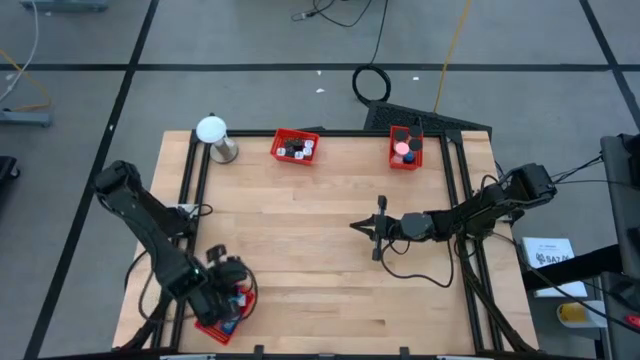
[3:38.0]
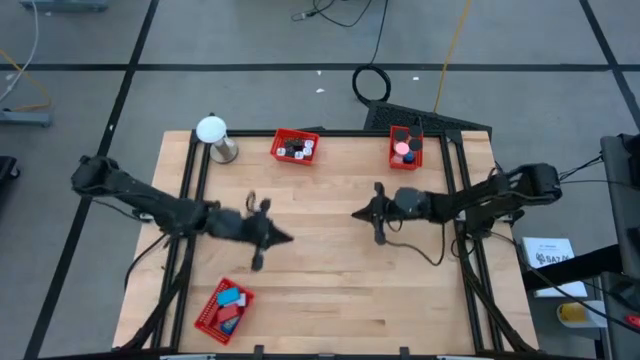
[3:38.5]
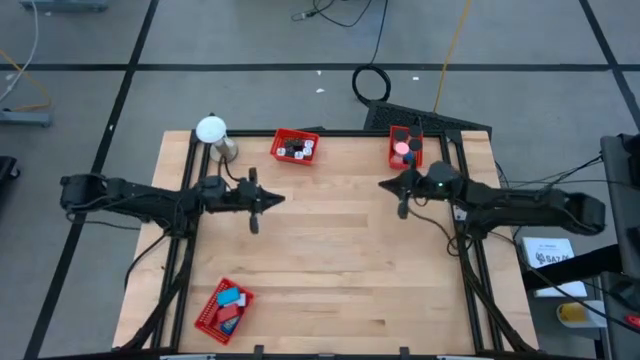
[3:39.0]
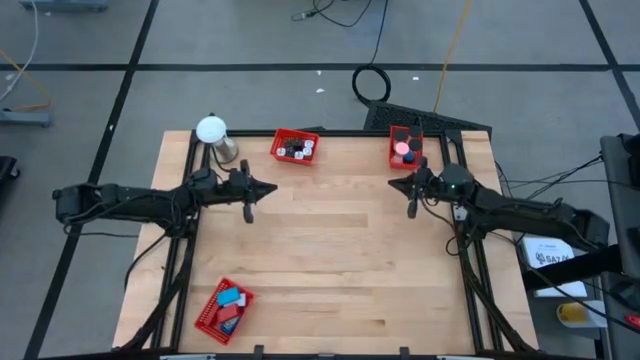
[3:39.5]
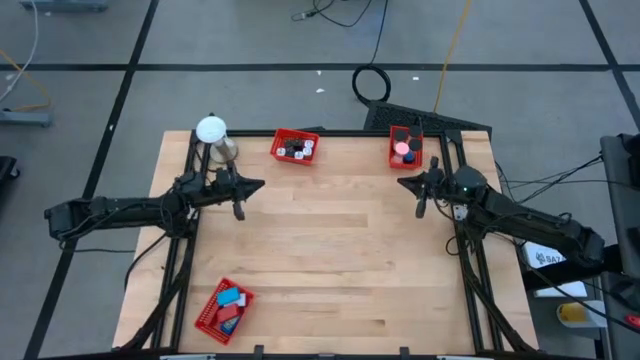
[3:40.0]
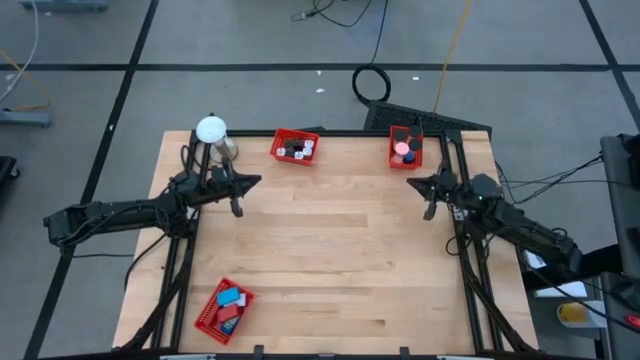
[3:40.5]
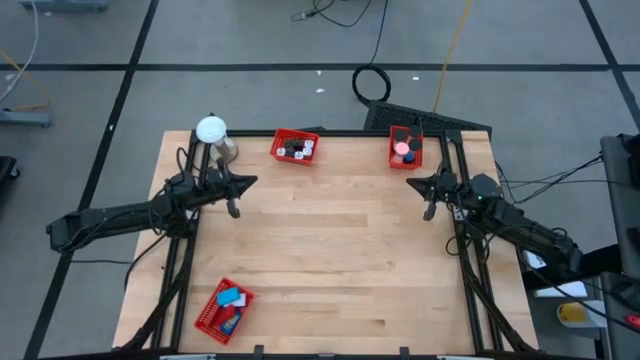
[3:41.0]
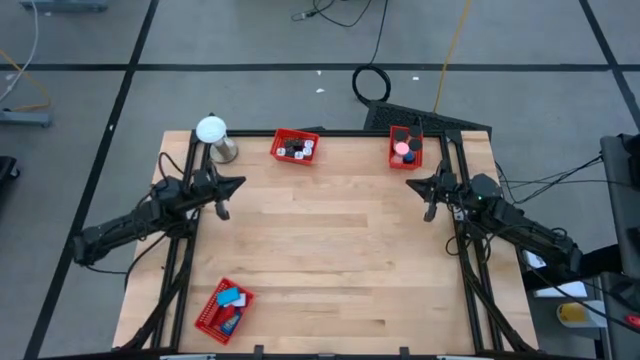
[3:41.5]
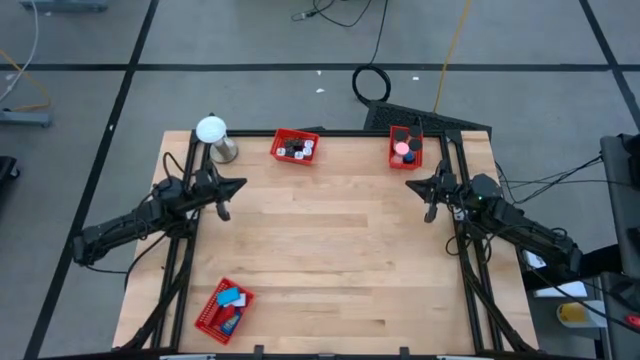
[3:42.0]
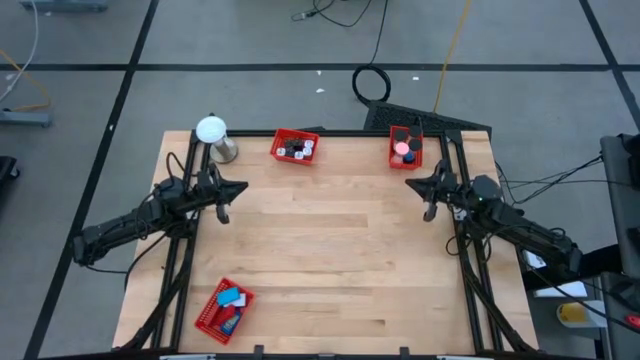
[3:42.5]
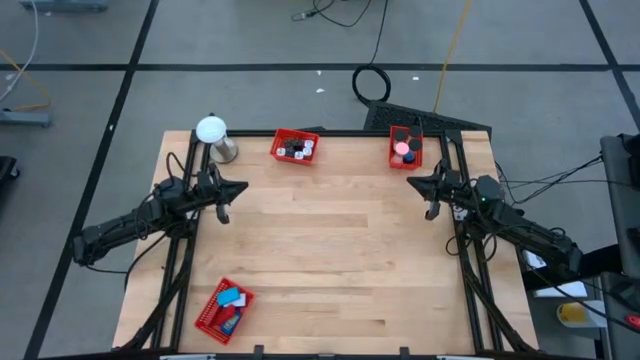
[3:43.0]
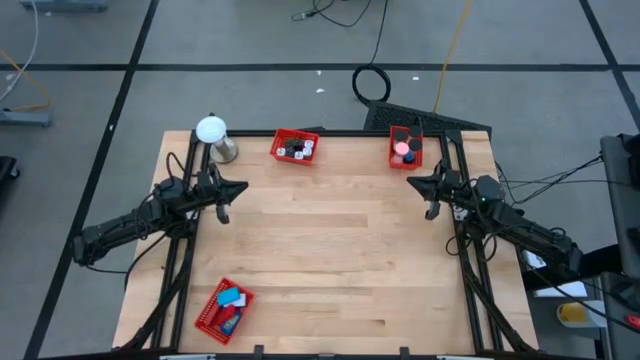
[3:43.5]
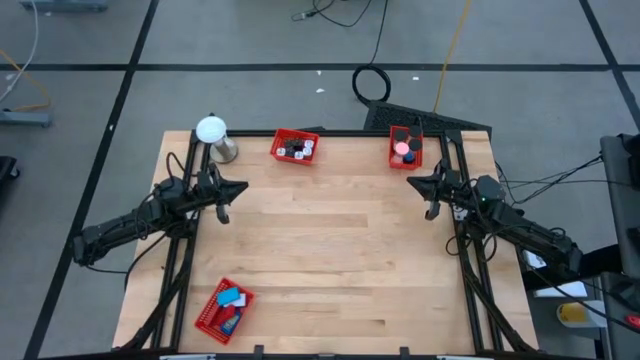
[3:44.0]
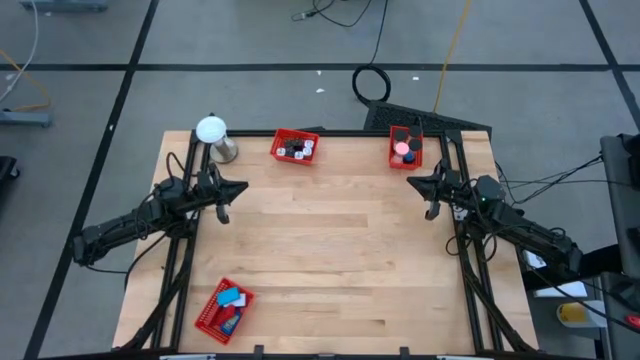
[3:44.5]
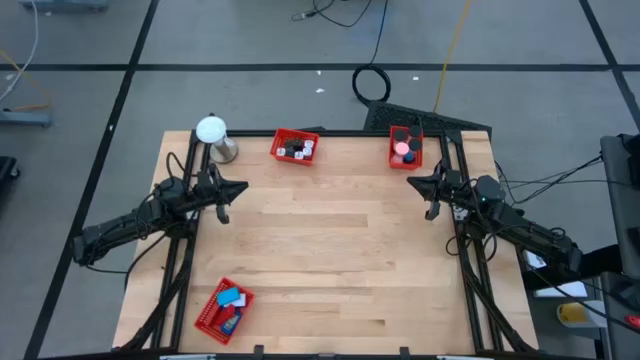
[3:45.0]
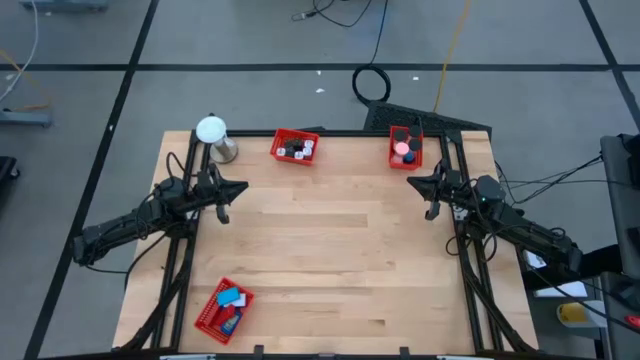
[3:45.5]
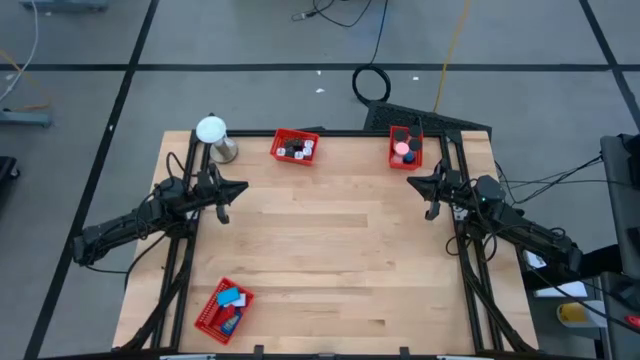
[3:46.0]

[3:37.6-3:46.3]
Task: Pick & Place Office items
Return to Home Position

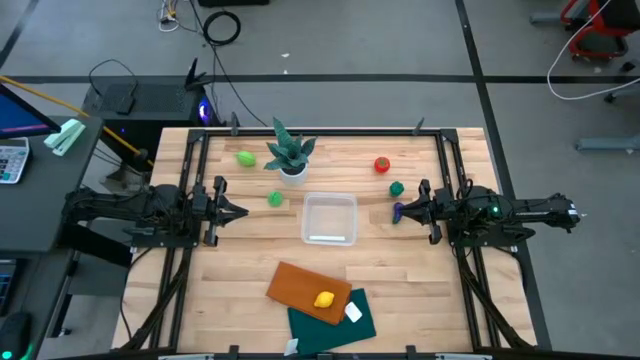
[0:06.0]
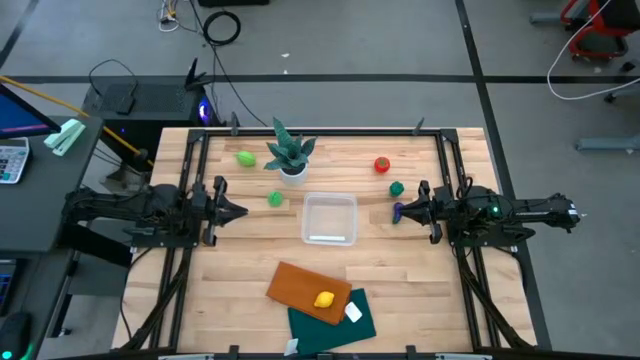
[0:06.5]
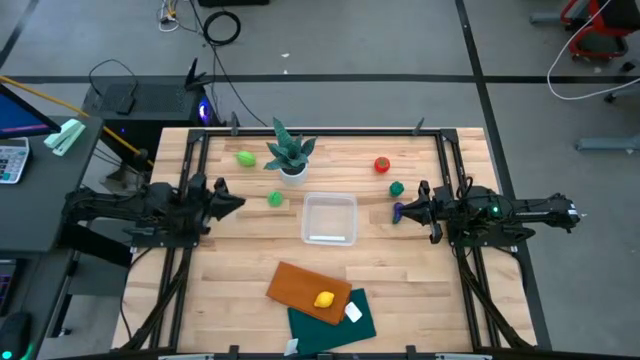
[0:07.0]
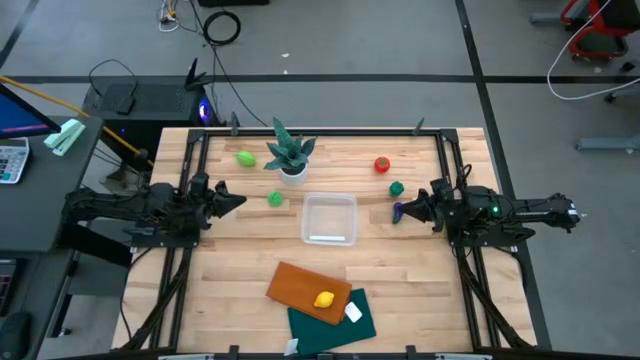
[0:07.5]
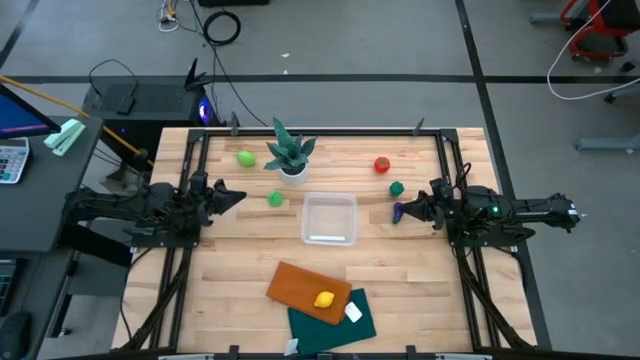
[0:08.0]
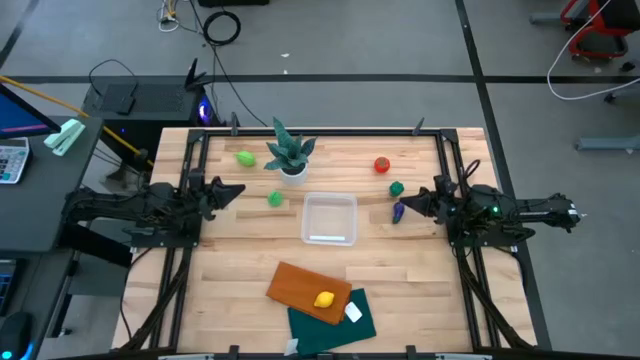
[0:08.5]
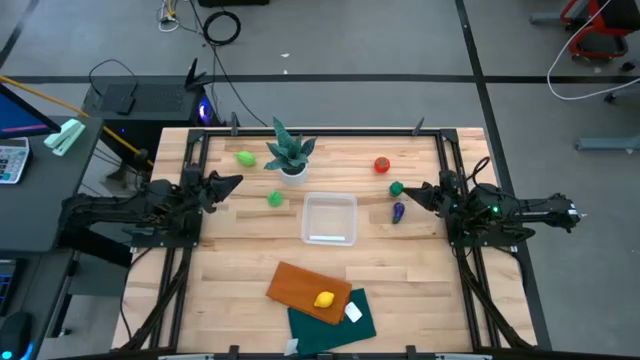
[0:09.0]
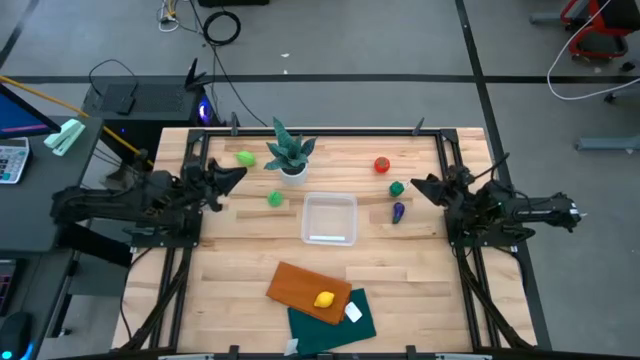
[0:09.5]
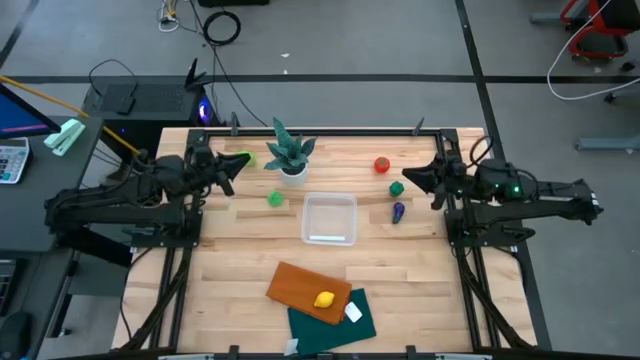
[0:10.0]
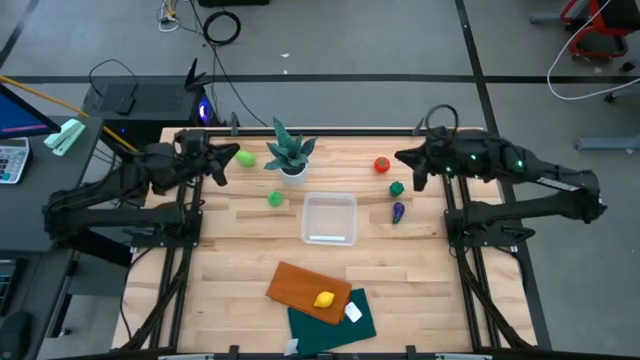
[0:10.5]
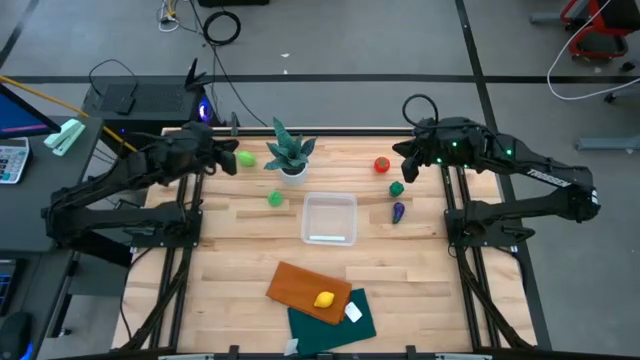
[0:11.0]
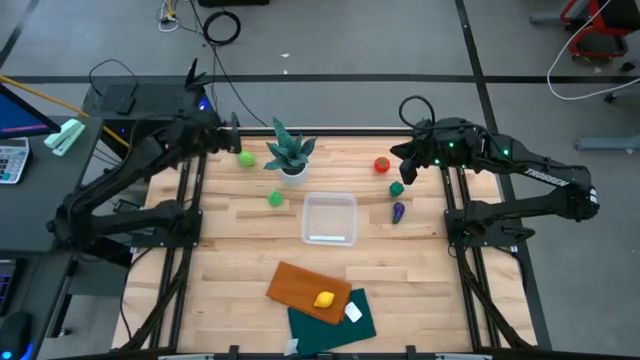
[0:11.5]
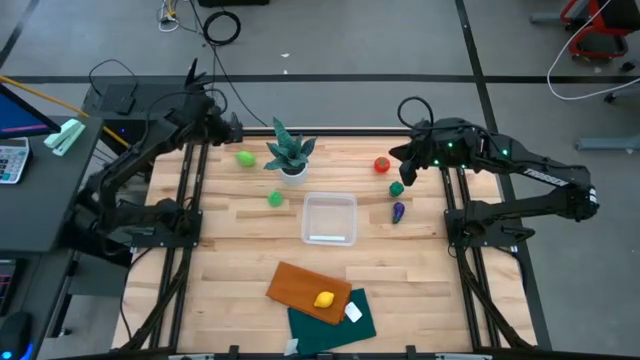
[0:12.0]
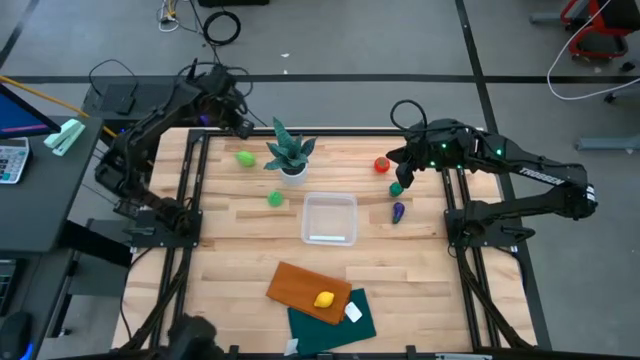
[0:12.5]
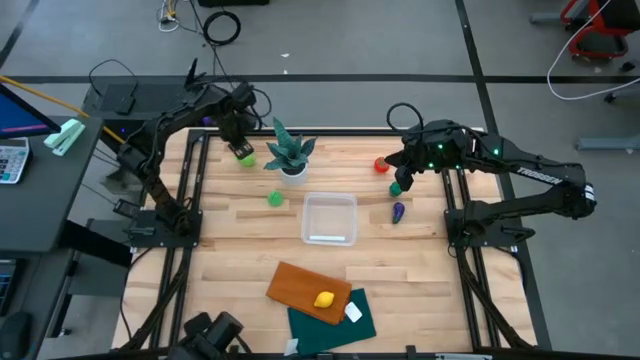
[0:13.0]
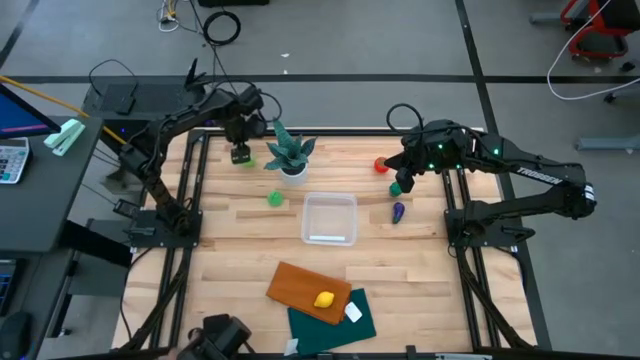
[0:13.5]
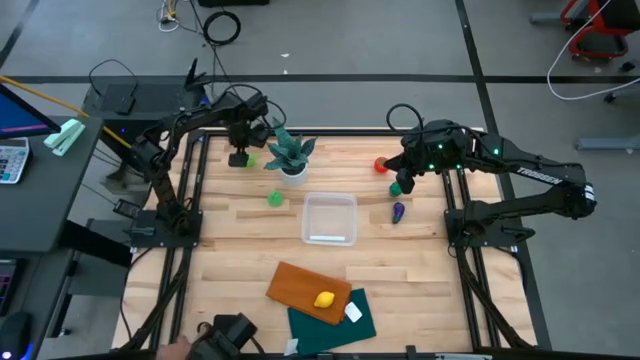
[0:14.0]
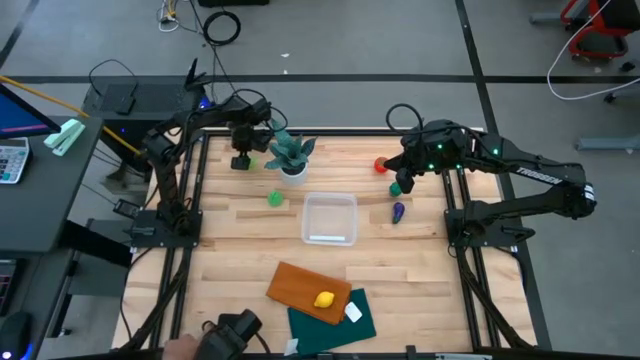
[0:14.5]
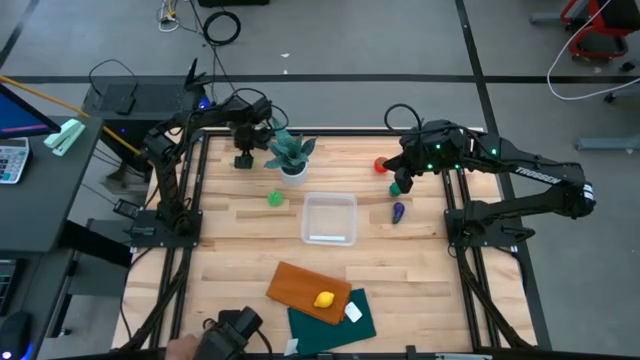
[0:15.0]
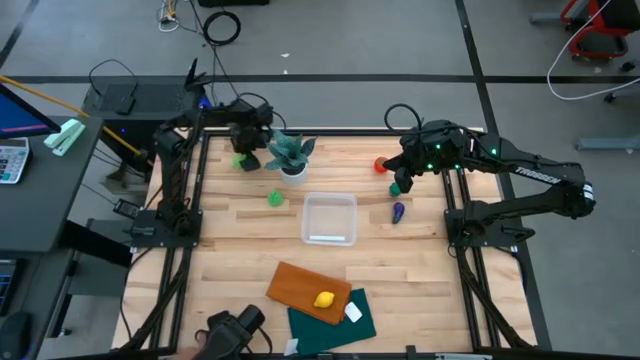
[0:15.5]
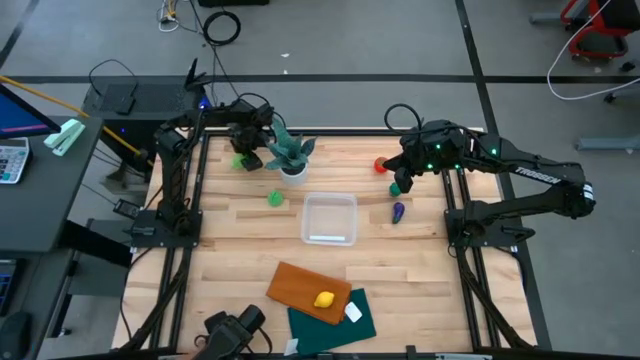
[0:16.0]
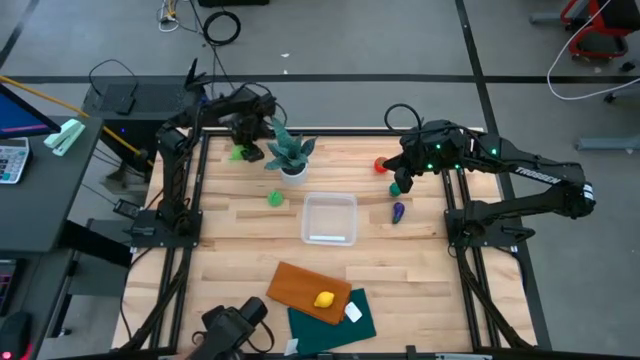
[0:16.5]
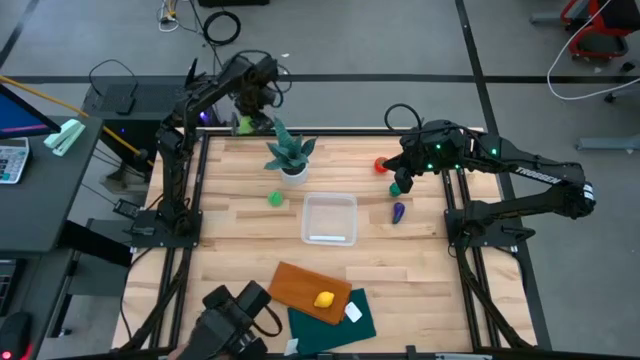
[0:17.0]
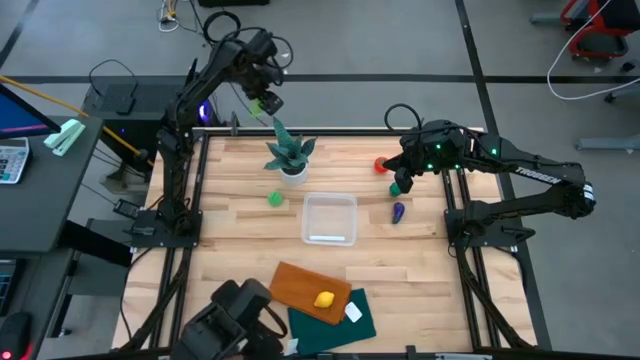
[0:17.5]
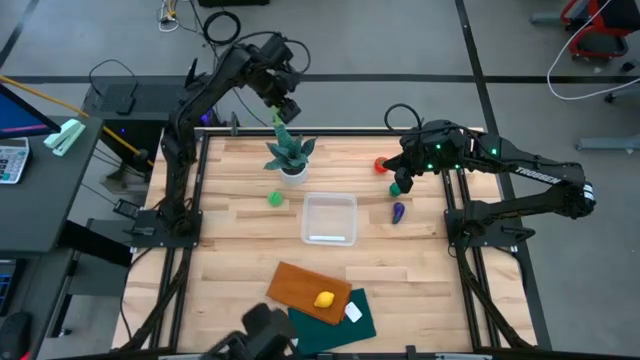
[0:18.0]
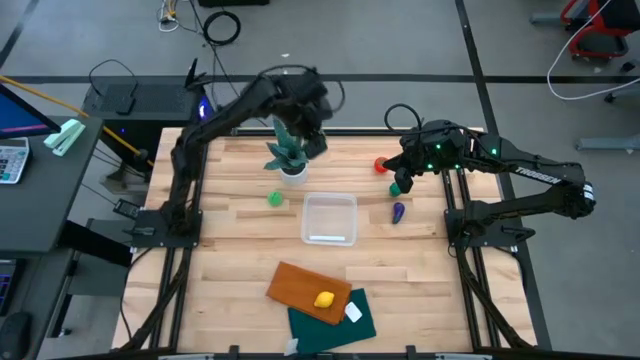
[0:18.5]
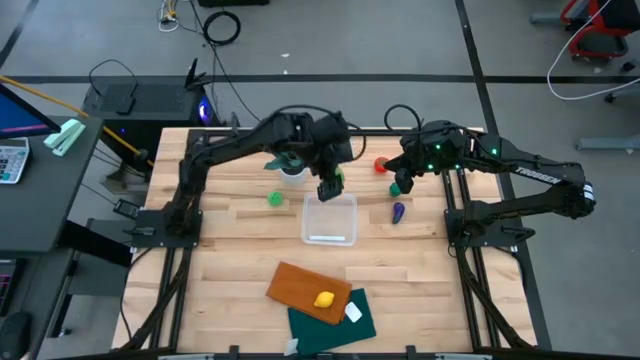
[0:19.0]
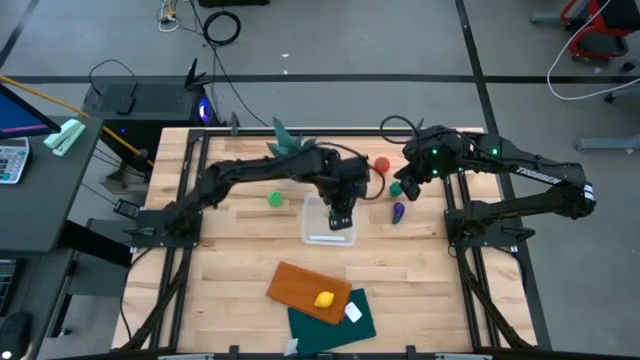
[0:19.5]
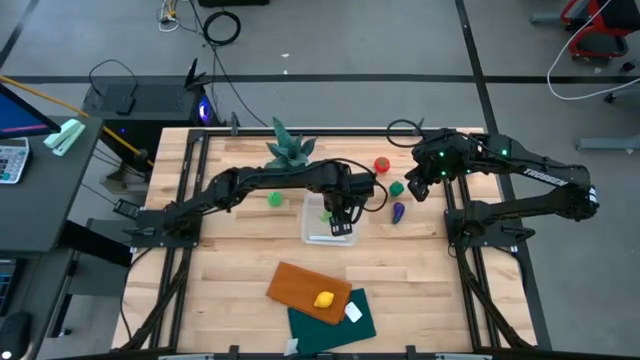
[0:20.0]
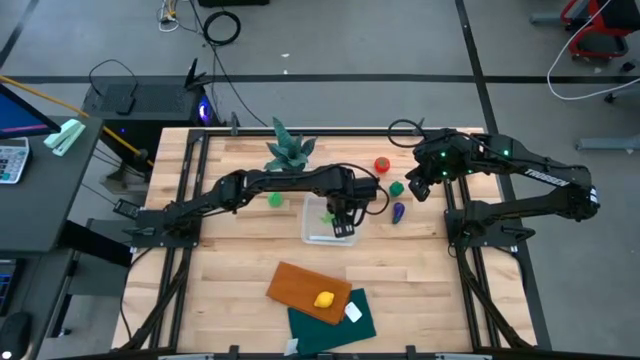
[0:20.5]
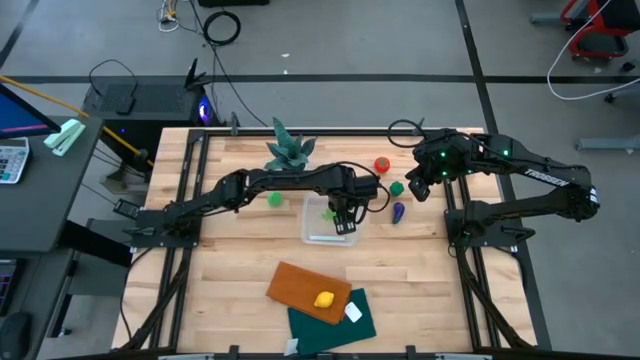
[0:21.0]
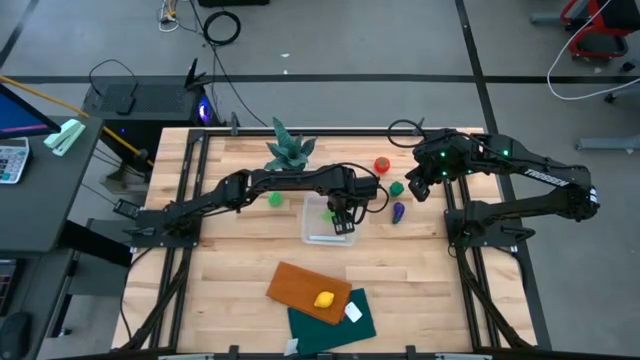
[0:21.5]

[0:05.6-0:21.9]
Task: Pick and placing Produce into tupperware
Put the cabbage into the transparent bin
